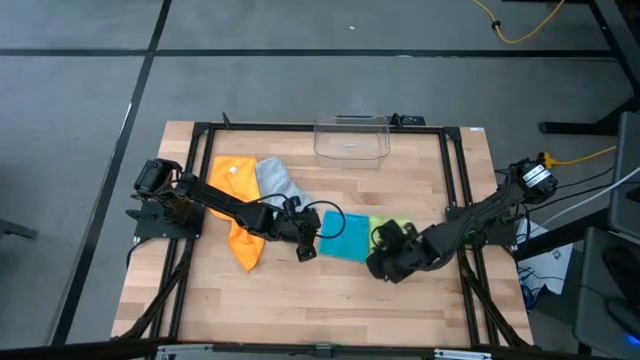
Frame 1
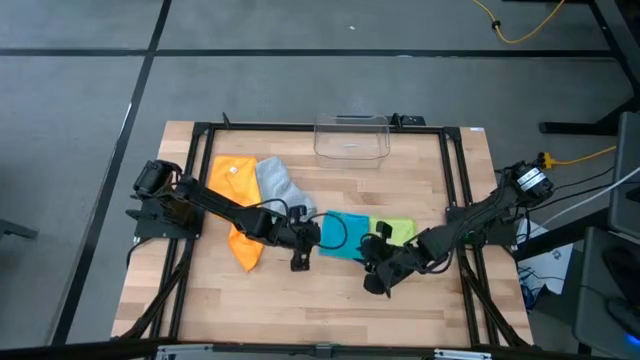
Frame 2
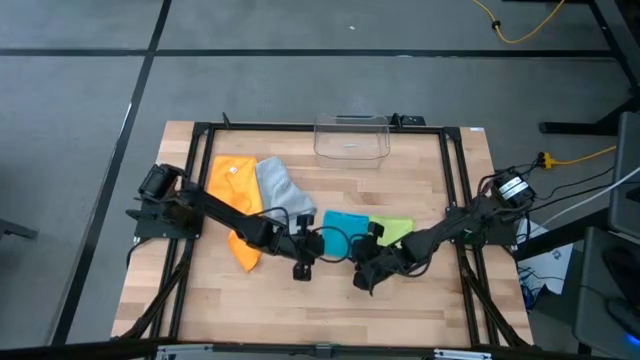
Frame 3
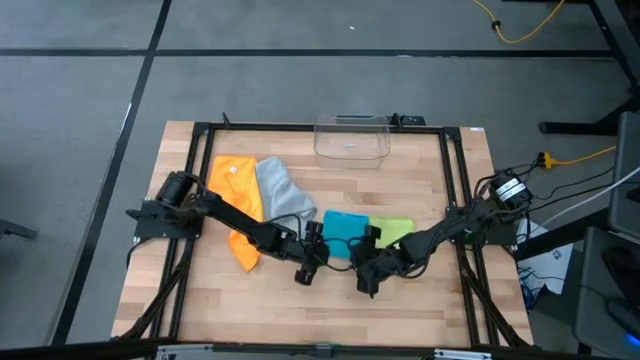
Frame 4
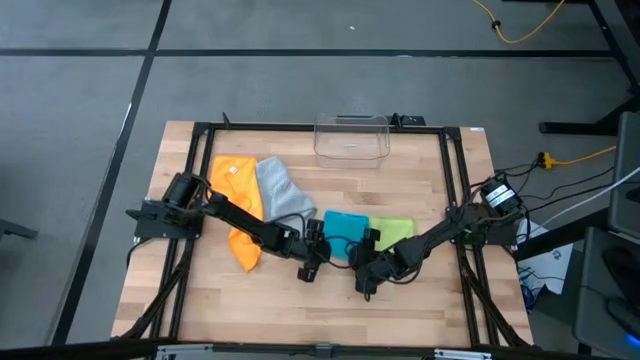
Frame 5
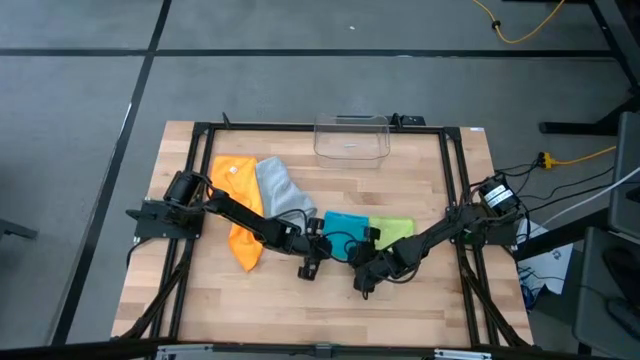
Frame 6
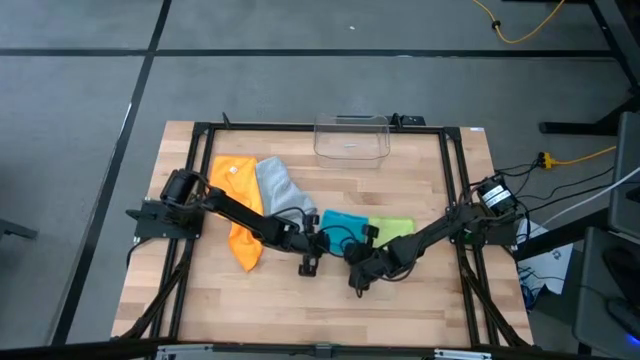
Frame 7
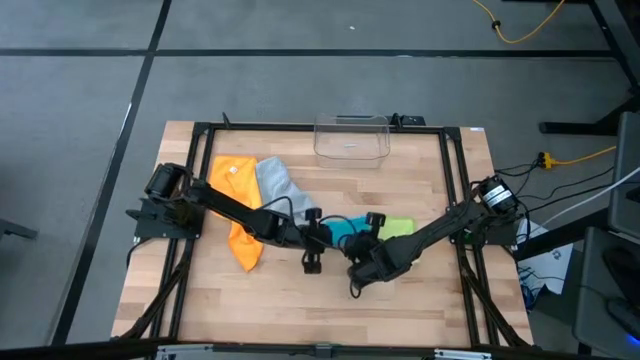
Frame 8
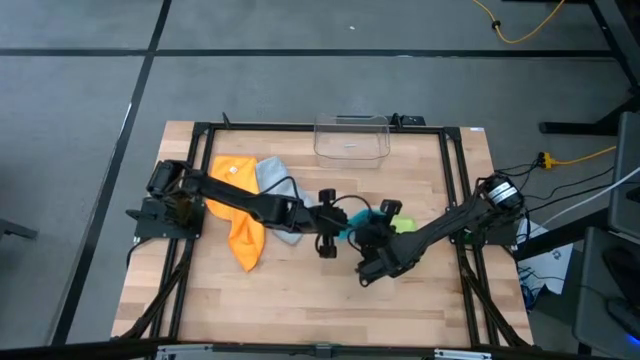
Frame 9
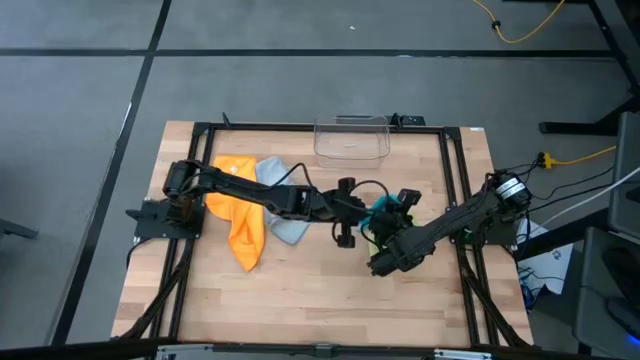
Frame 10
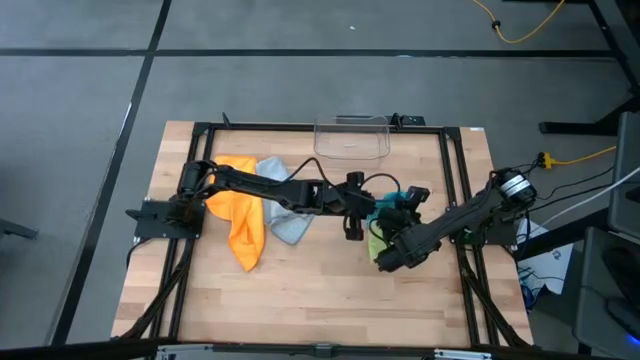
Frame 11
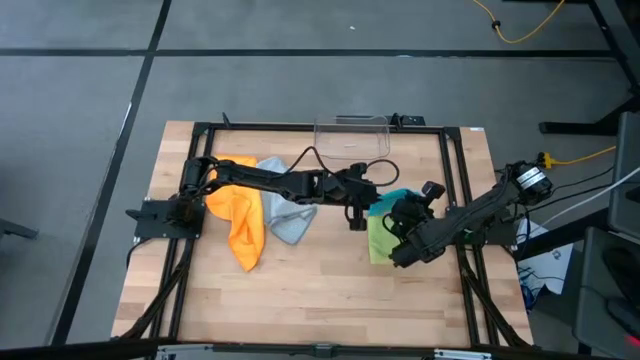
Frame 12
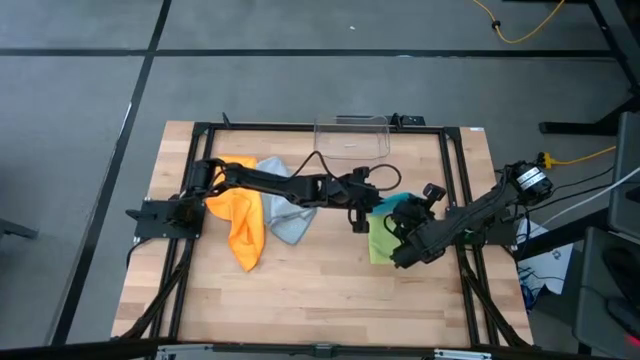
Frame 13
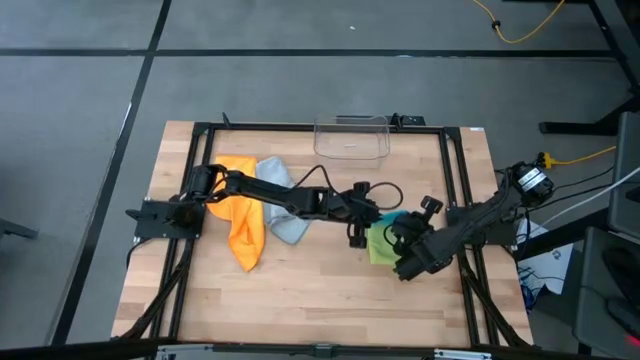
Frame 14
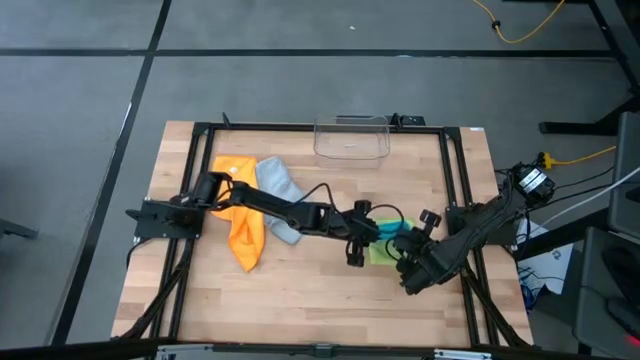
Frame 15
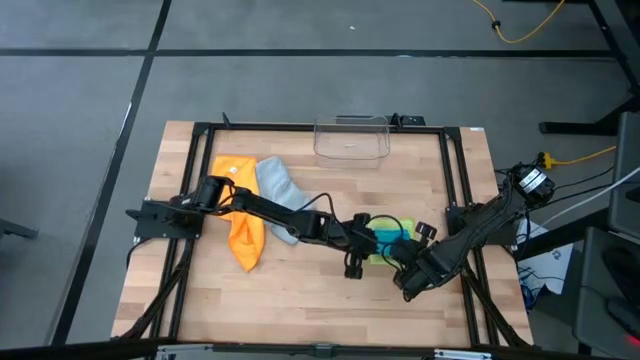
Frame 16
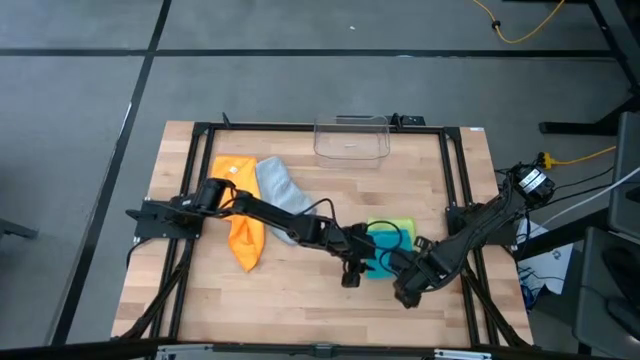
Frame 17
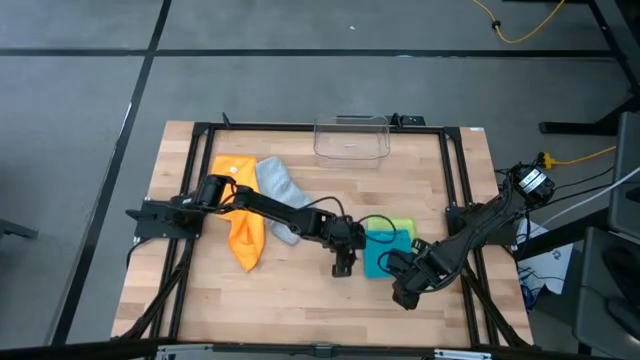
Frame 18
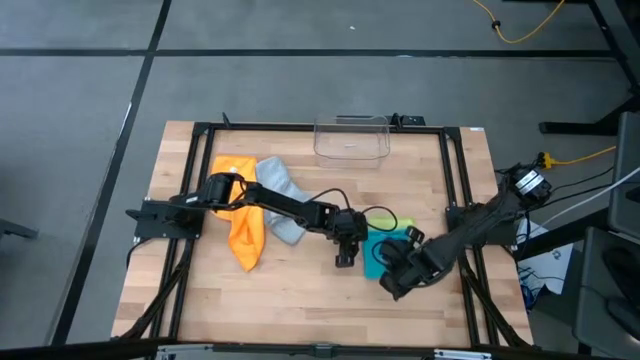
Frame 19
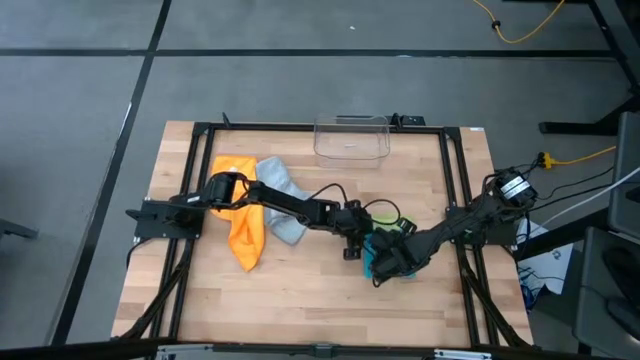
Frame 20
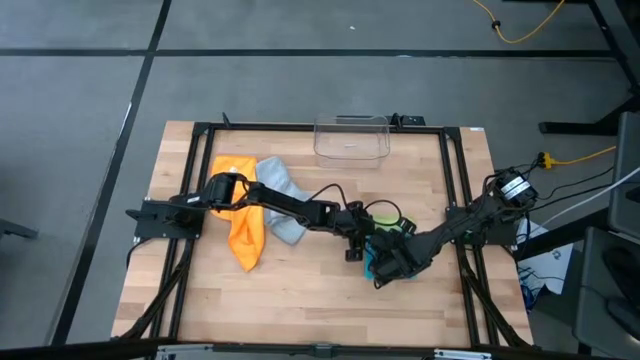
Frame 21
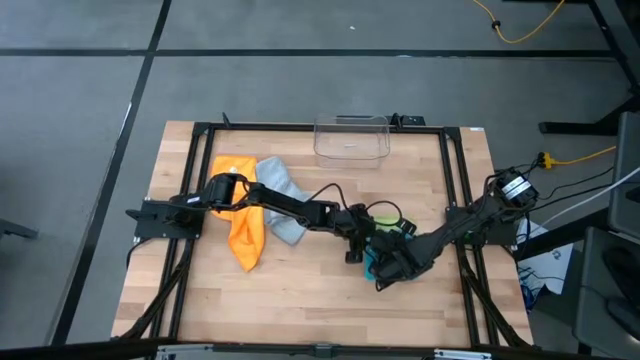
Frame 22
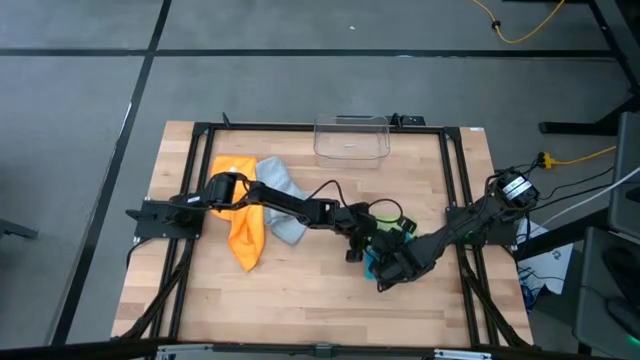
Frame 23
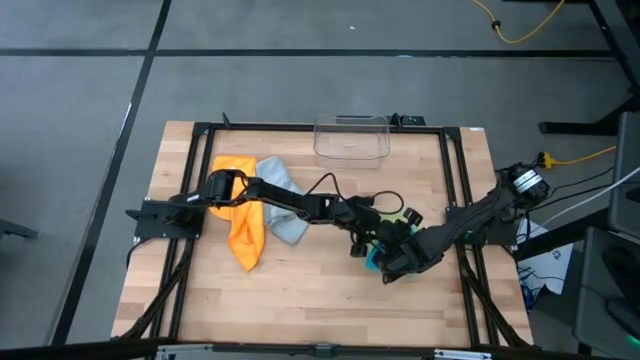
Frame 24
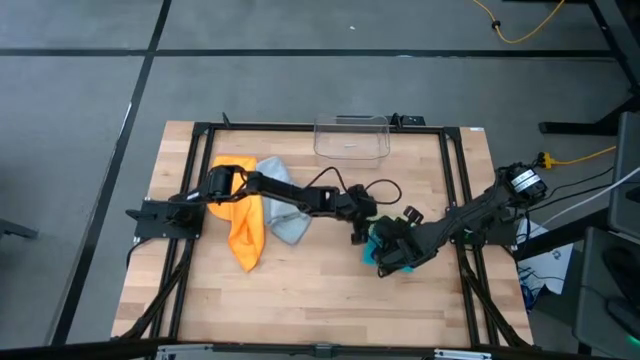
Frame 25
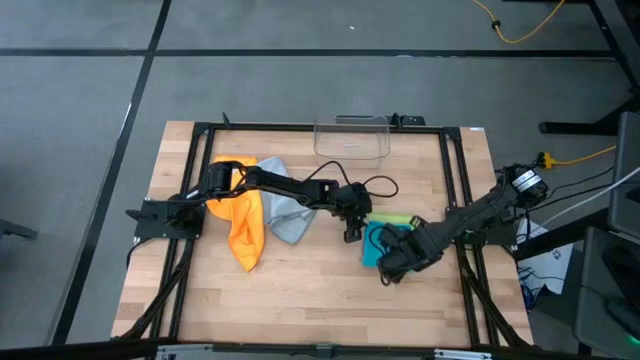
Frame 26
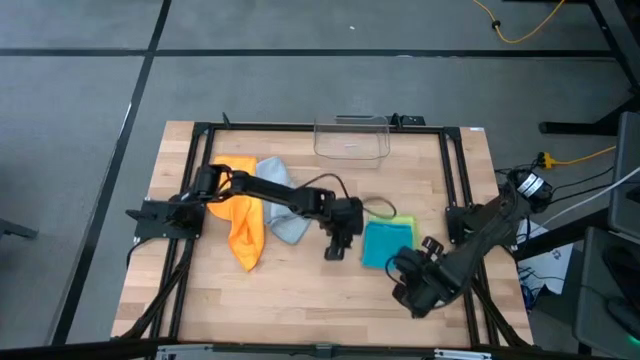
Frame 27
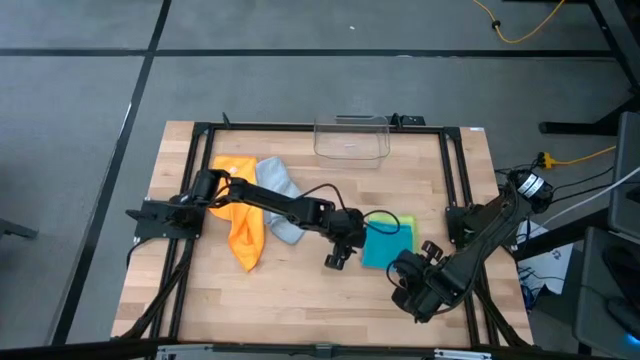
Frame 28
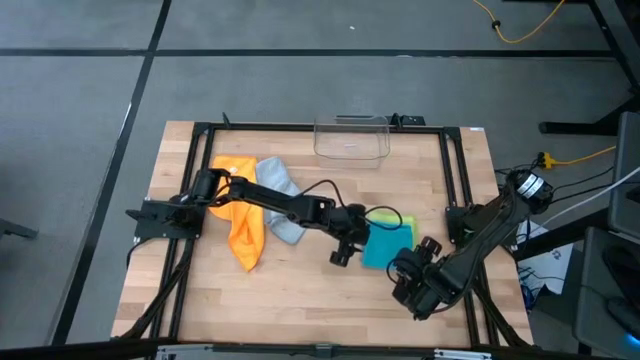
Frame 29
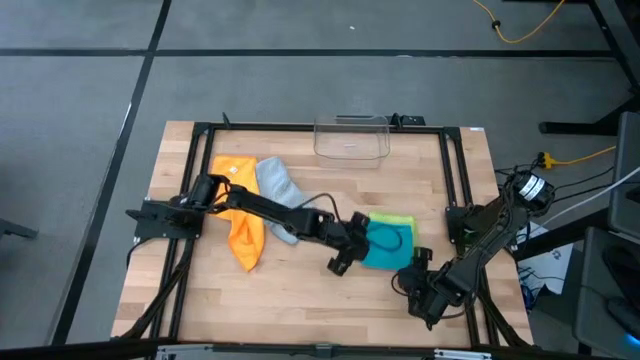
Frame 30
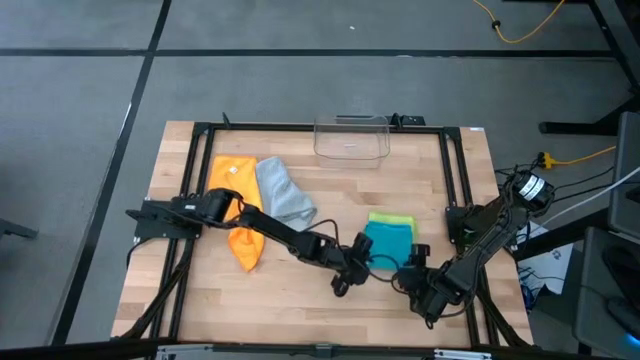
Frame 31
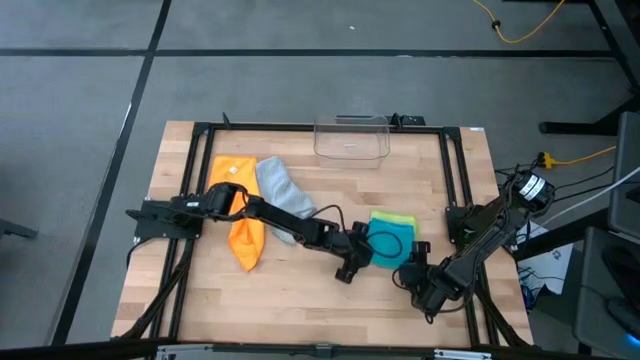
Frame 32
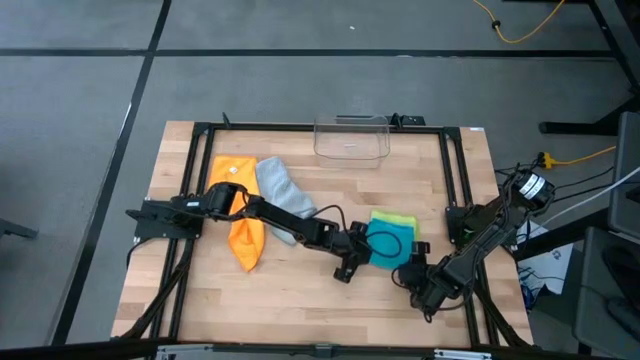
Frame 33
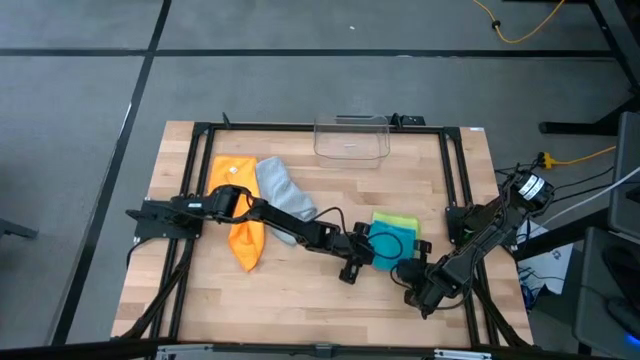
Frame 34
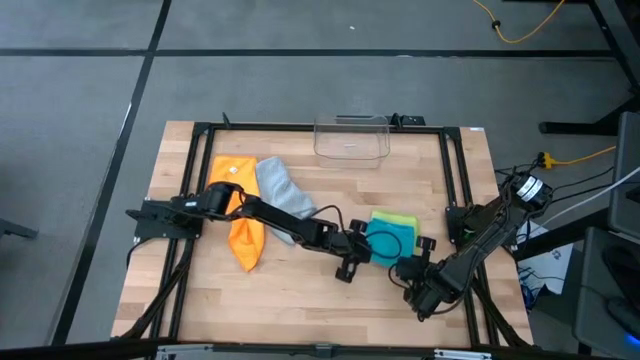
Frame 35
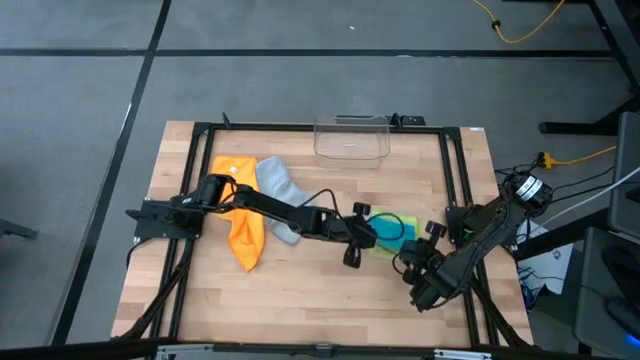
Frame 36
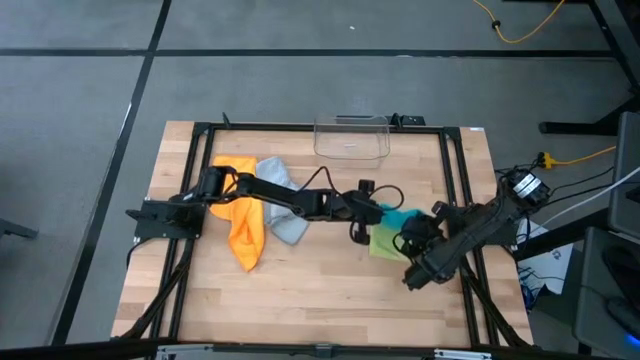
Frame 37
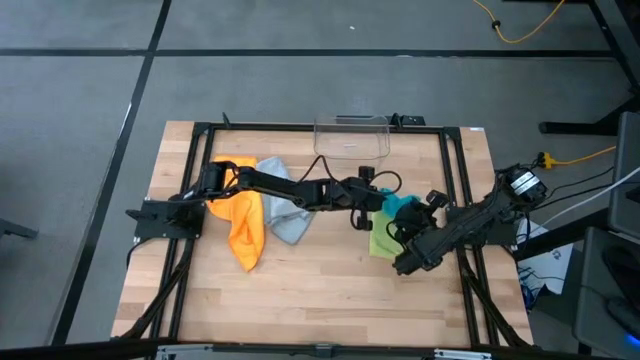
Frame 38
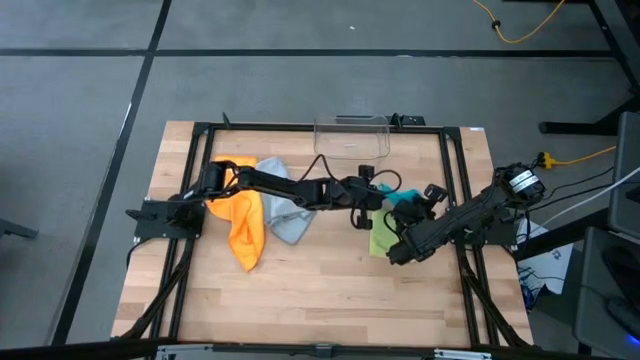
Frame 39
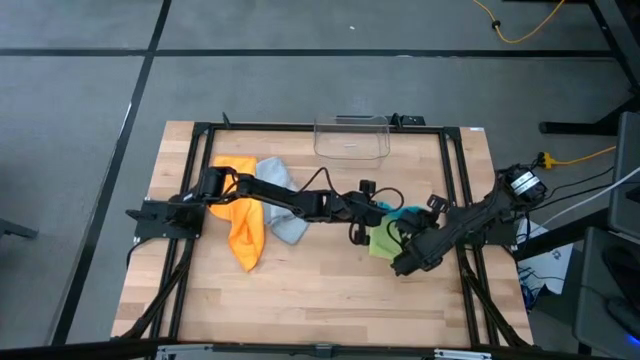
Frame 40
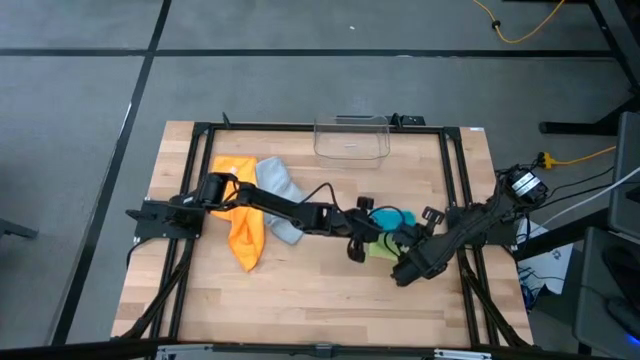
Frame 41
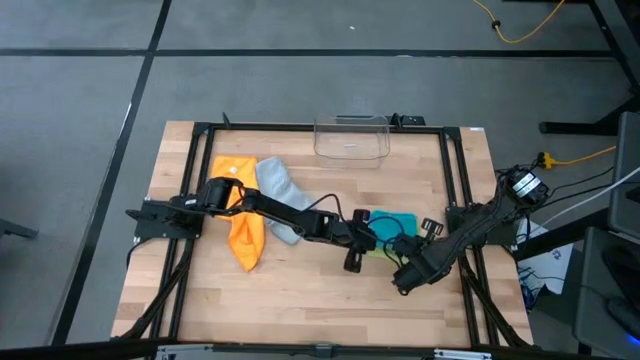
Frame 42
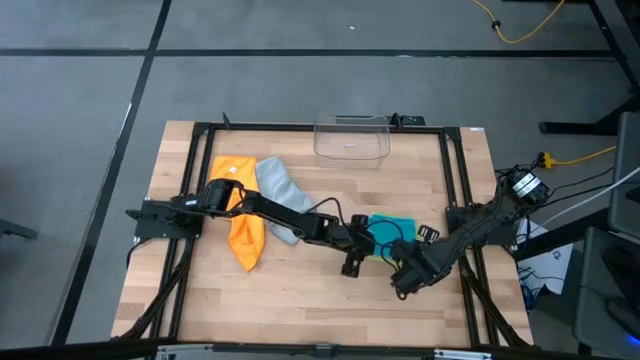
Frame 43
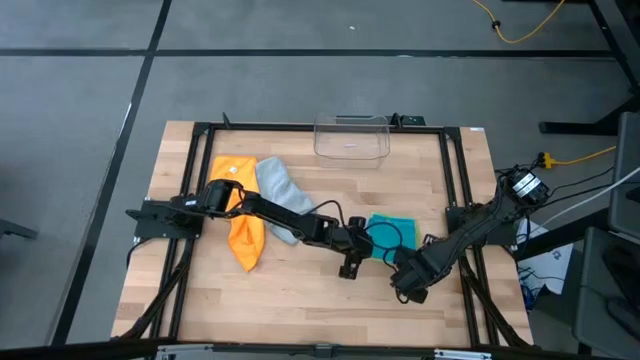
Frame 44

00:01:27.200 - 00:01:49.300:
Task: Fold microfiber towels
Stack the blue microfiber towel on top of the green microfiber towel
